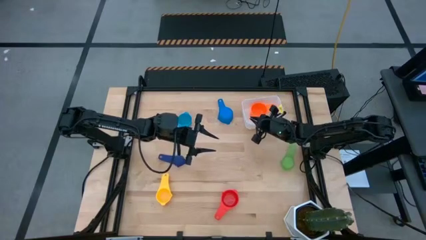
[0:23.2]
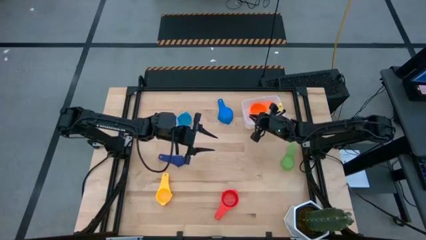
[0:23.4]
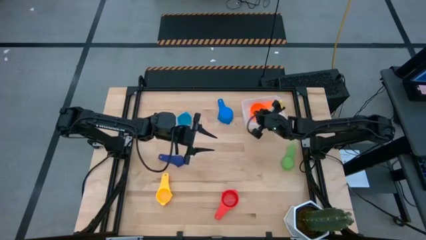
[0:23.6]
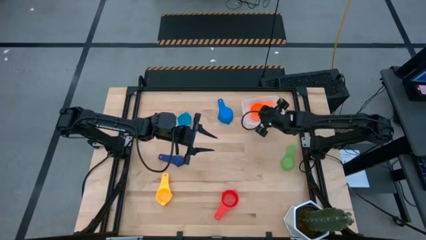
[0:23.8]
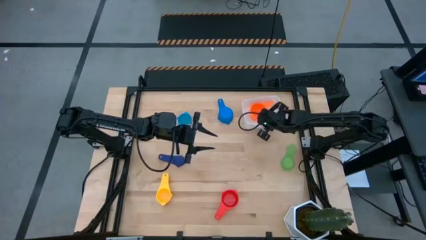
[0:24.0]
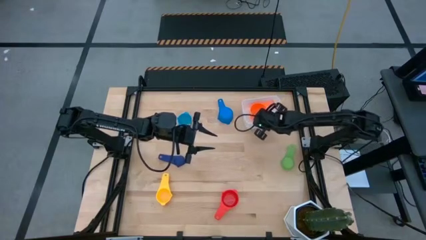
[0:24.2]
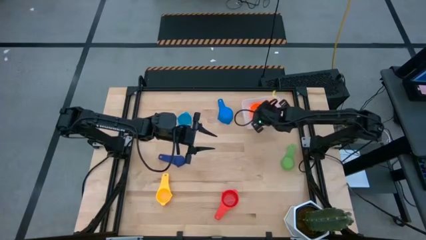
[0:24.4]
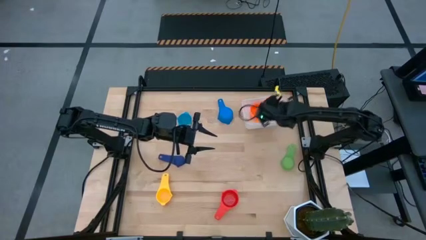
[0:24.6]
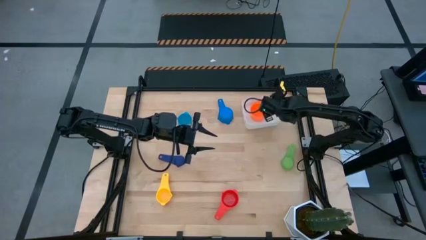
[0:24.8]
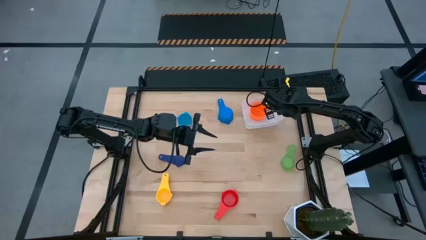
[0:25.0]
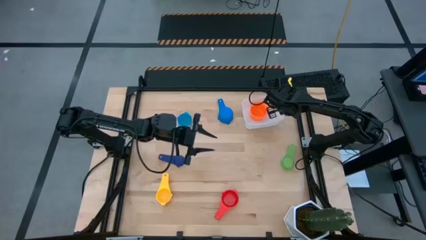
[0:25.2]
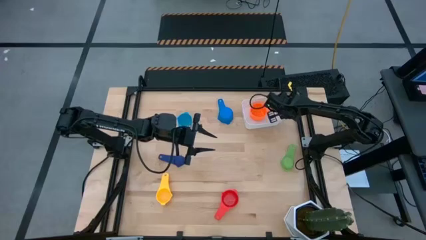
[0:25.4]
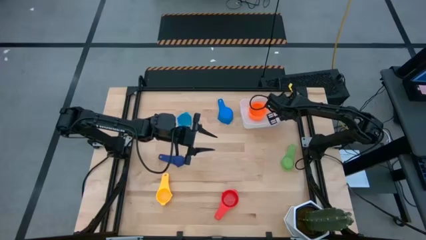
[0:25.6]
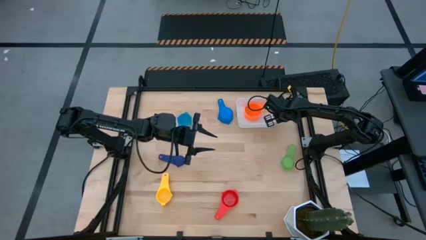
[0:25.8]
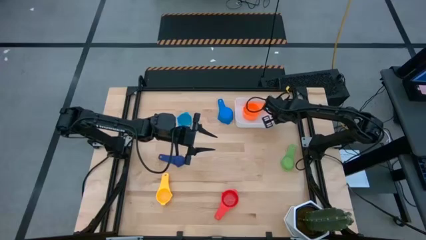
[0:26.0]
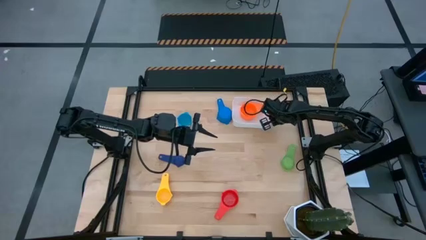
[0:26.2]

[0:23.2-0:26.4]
Task: Nest measuring cups in basket
Adjust the white bin

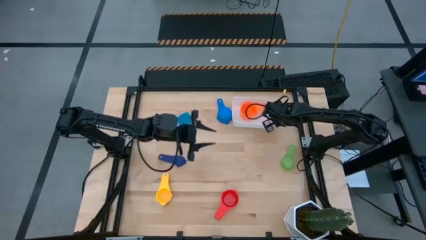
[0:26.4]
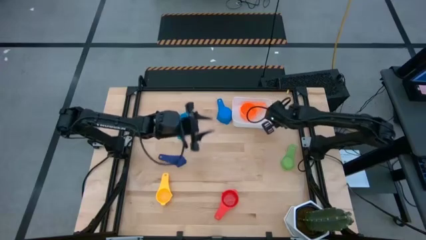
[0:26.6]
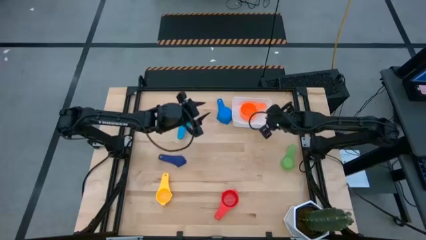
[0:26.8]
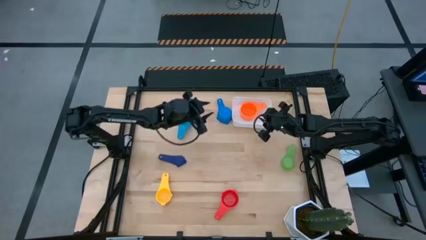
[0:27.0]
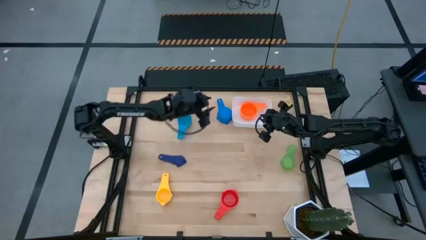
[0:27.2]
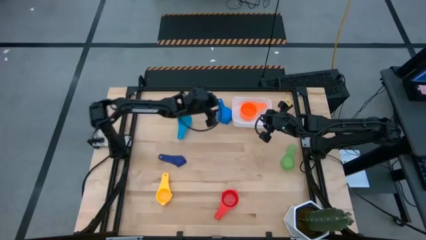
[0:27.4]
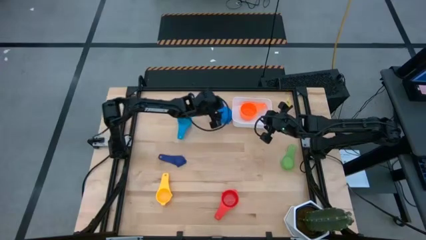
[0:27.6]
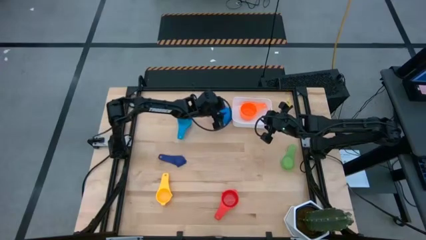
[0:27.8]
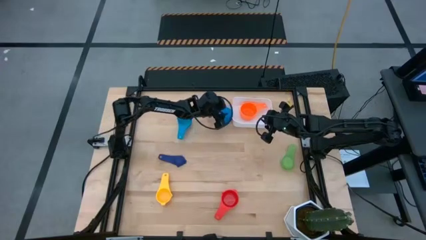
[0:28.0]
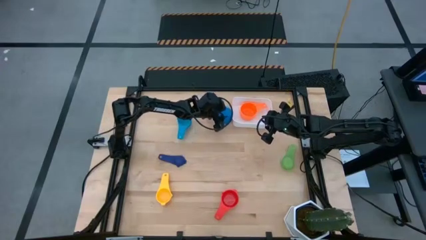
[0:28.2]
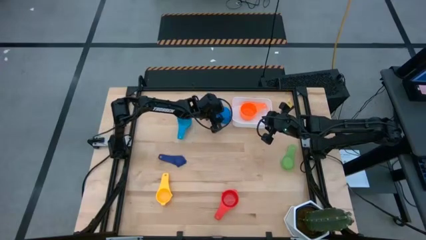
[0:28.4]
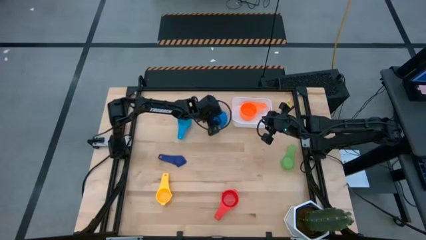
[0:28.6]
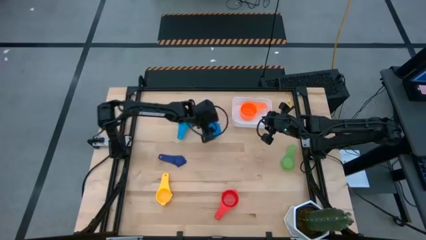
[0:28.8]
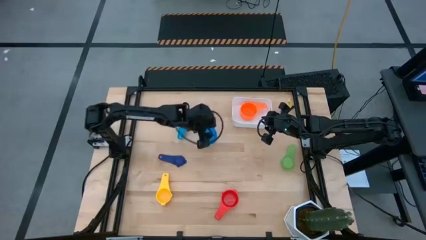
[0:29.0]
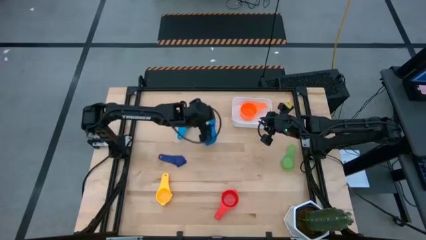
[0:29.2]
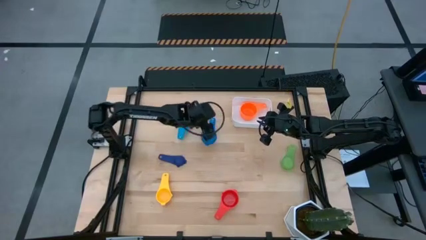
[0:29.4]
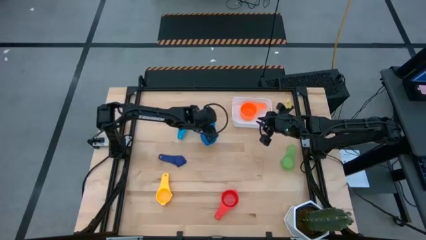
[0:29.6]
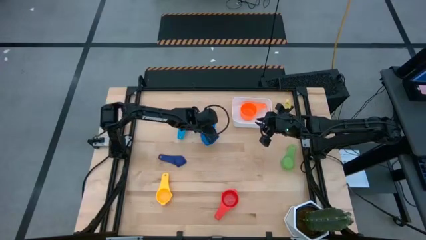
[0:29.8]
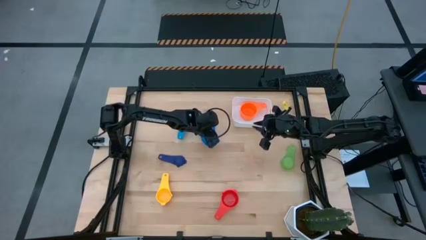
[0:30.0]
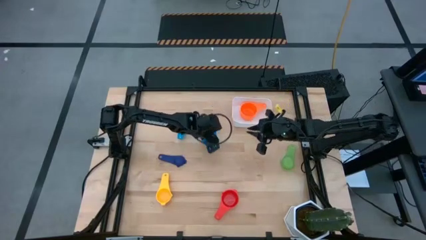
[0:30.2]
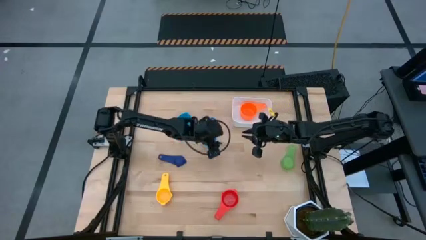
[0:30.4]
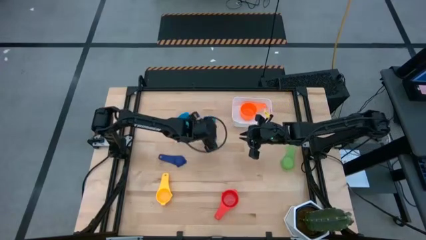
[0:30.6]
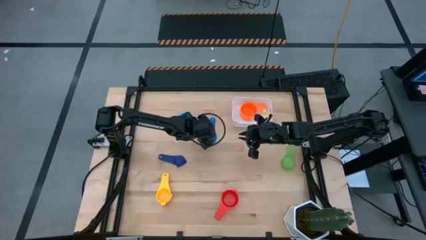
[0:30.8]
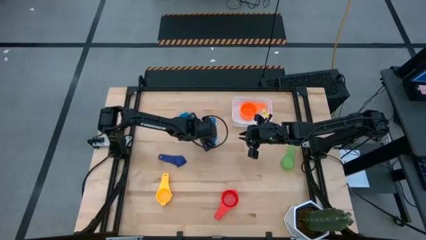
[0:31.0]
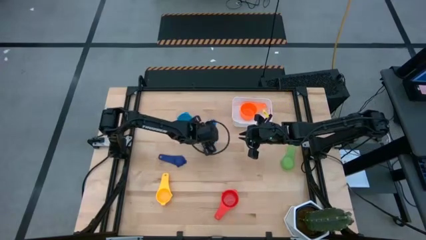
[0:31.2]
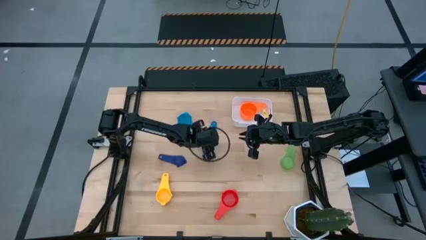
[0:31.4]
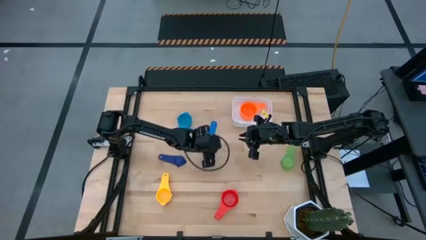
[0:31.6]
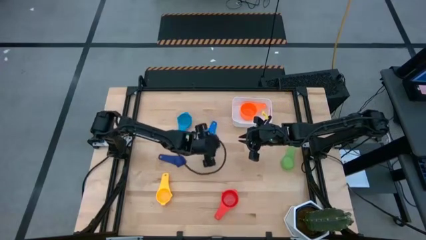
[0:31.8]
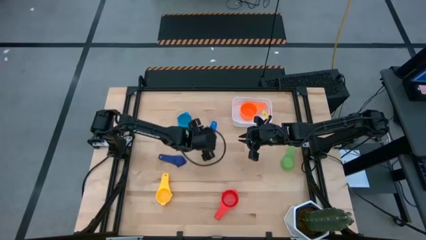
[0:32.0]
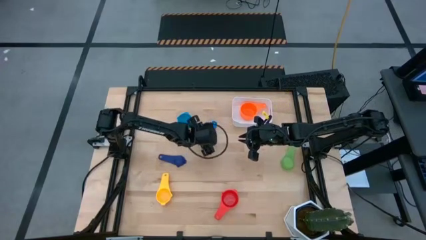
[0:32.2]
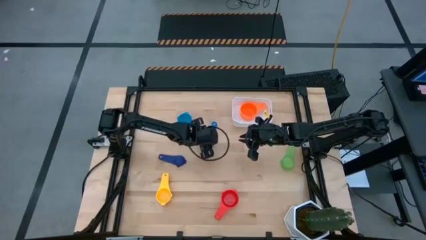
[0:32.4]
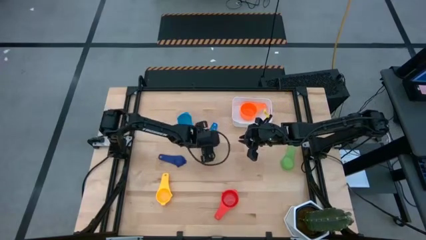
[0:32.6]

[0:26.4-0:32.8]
Stack the blue measuring cup on top of the orange measuring cup in the white bin

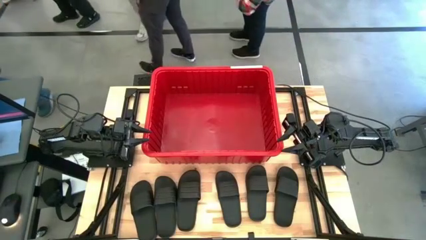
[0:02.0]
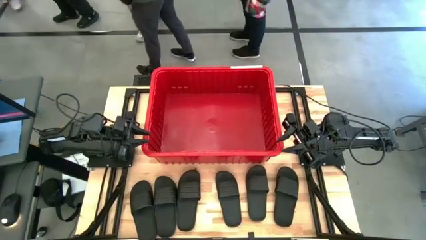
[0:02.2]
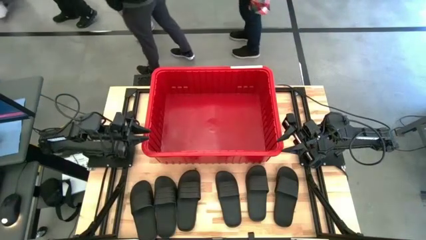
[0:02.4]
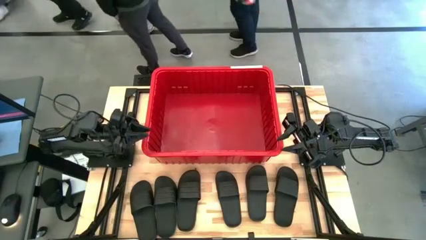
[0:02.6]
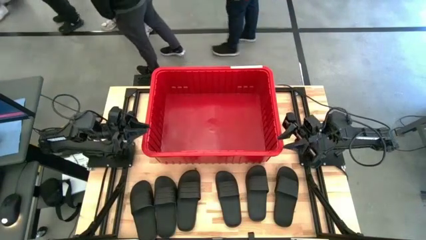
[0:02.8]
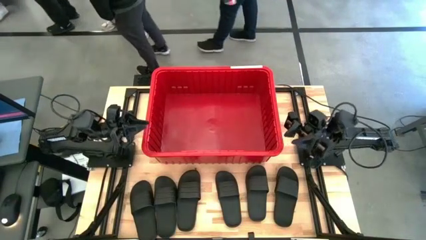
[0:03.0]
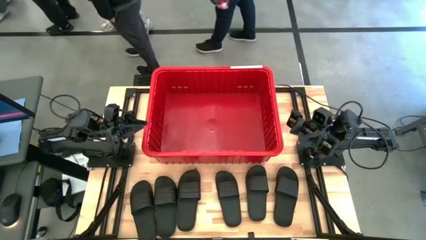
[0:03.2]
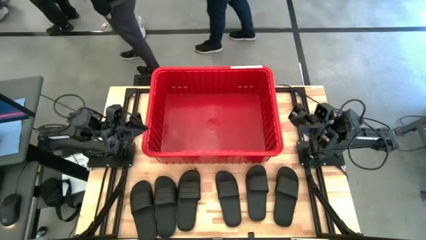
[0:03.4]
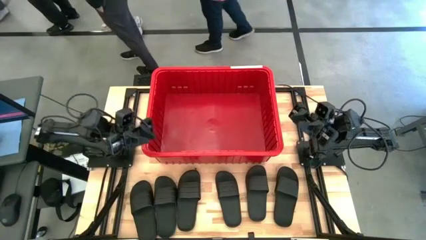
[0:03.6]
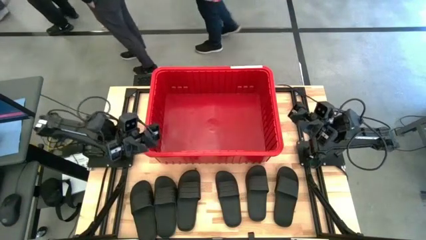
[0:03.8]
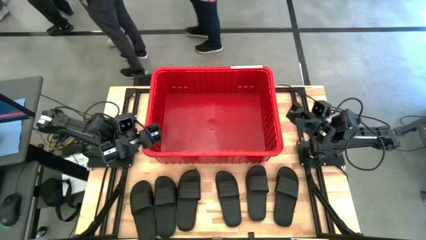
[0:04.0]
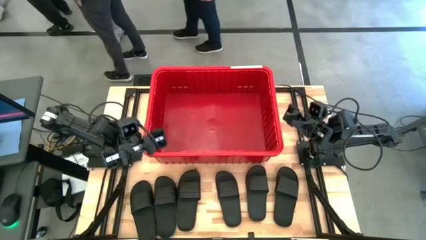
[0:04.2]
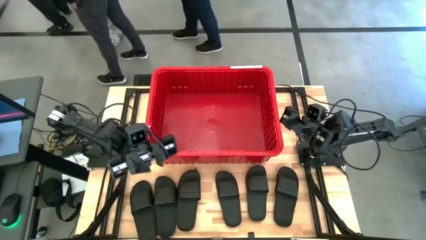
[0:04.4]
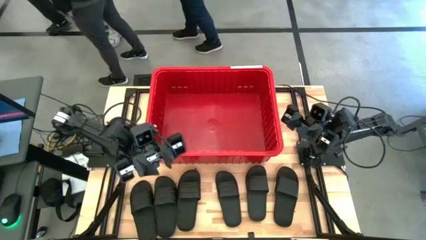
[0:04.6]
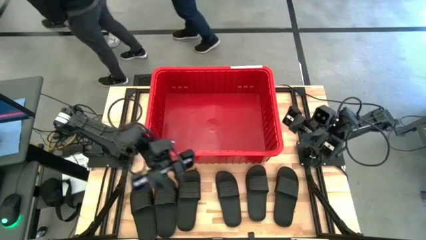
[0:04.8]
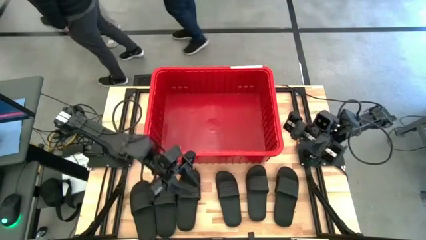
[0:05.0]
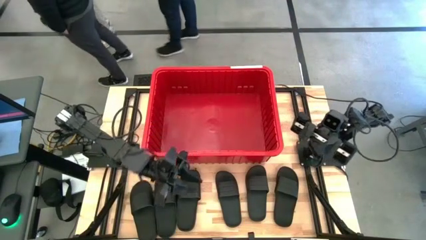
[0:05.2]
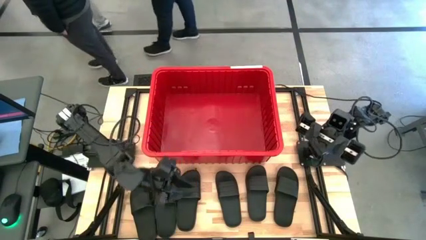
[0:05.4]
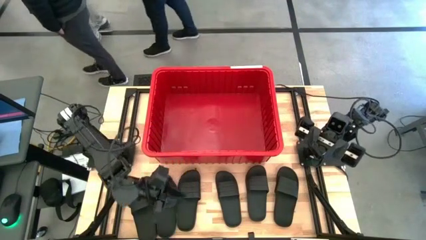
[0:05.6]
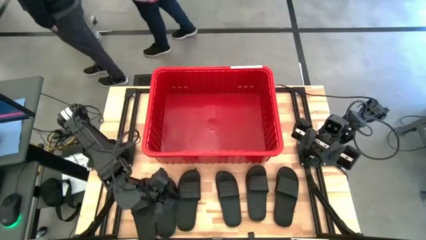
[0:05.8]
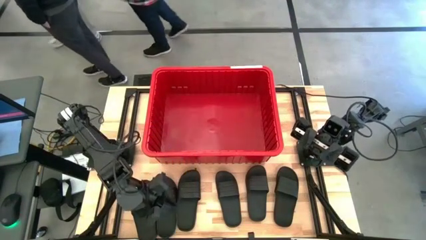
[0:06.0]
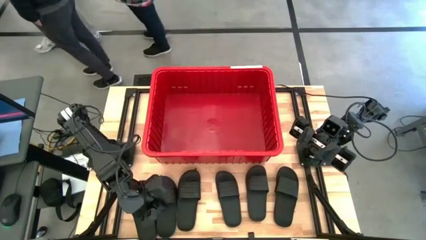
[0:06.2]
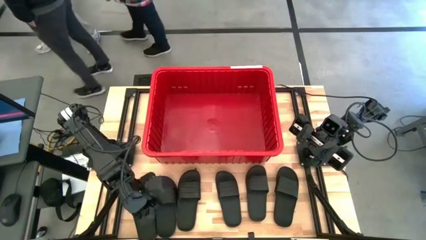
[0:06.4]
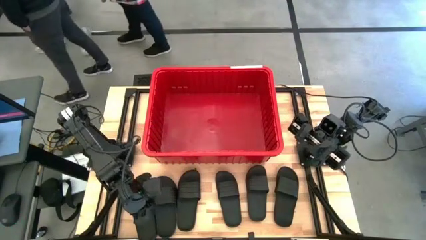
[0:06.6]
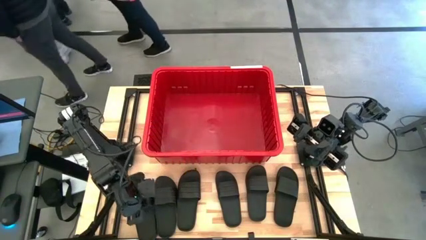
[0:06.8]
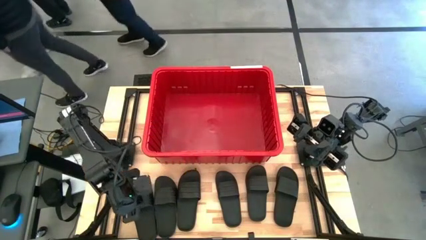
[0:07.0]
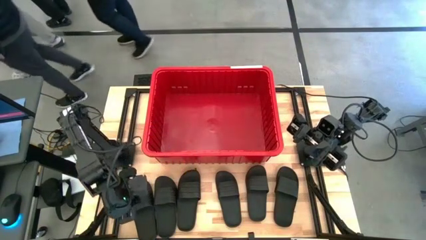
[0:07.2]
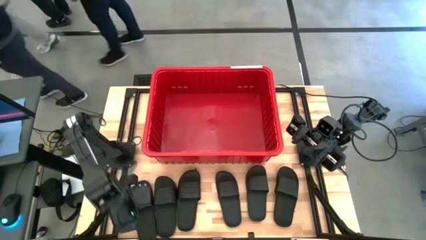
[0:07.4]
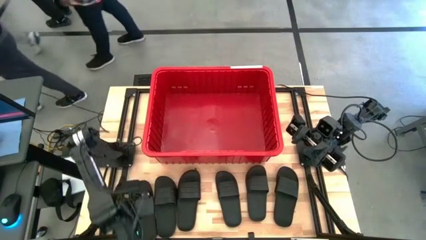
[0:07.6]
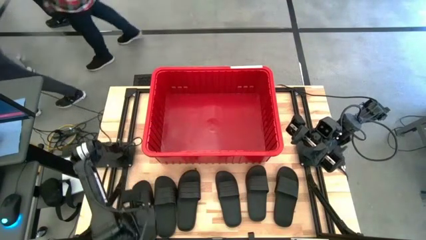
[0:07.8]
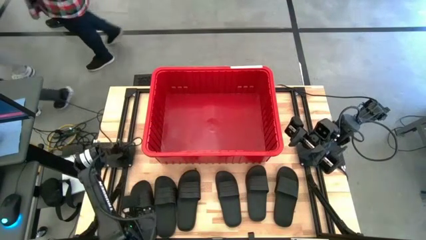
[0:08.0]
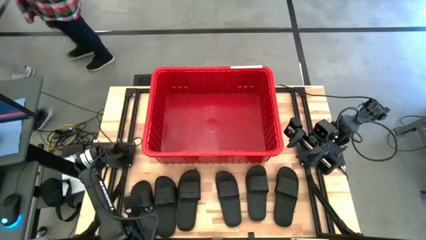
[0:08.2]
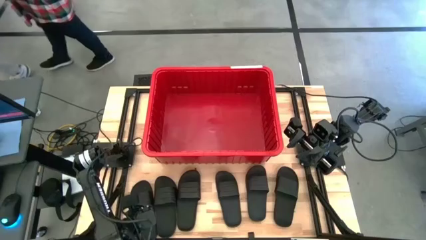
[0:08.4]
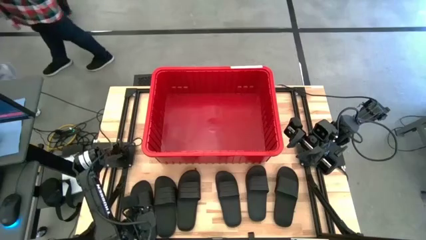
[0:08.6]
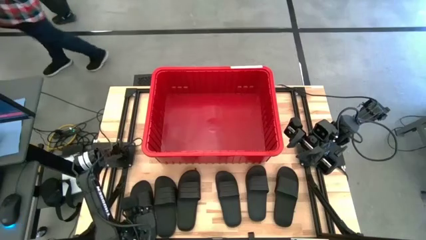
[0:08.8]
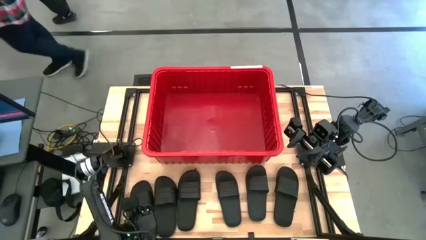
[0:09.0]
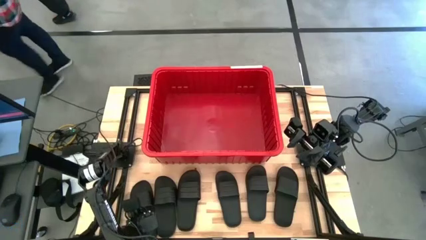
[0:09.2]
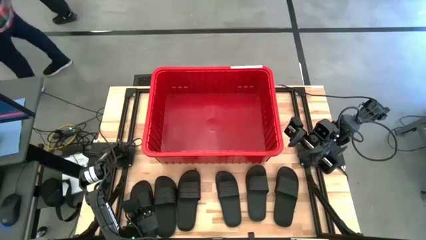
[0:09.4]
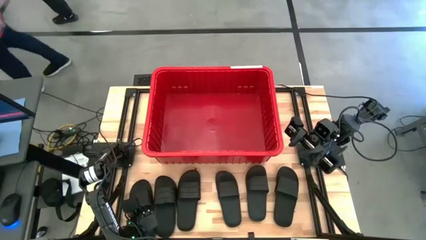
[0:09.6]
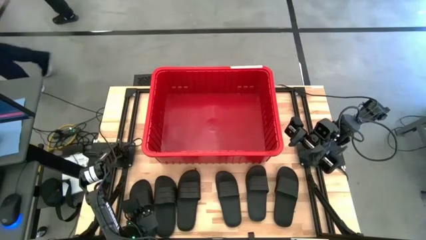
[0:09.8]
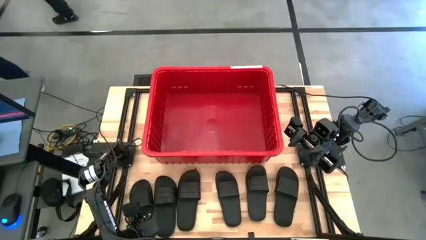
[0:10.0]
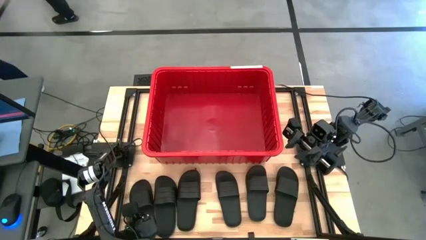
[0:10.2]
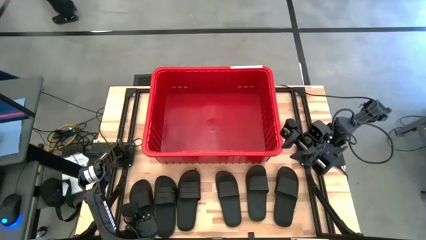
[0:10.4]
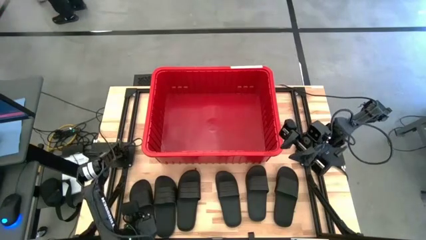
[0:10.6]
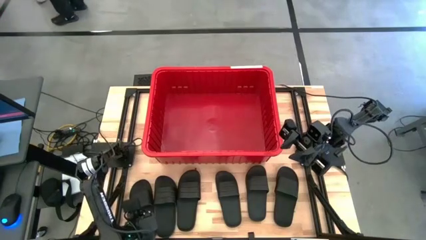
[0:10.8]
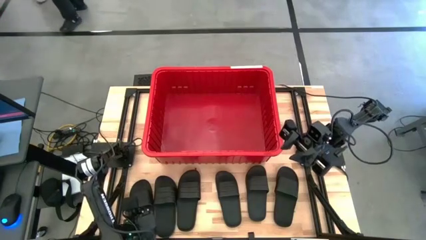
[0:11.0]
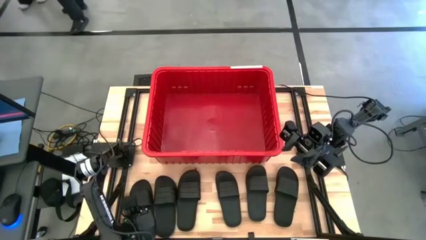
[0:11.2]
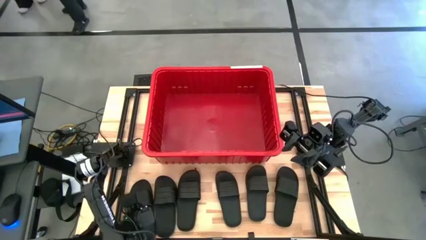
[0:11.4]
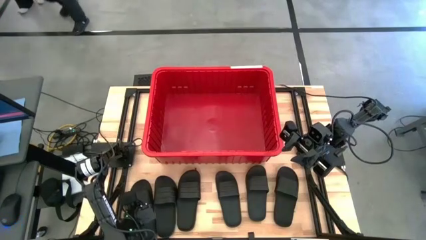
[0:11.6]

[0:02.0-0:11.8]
Task: Pick and place slides into bin
Put the black slides into the red bin
